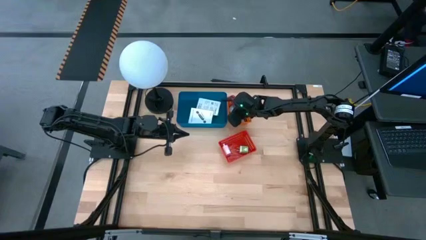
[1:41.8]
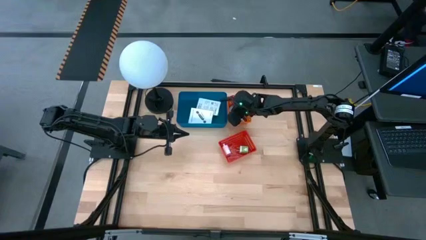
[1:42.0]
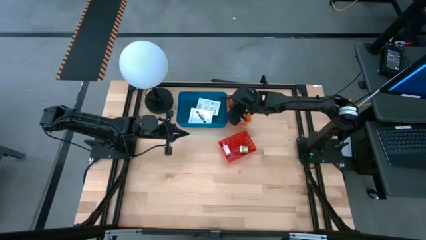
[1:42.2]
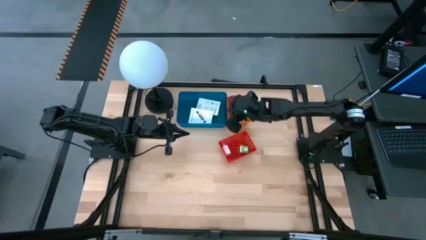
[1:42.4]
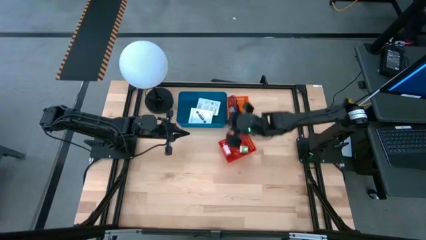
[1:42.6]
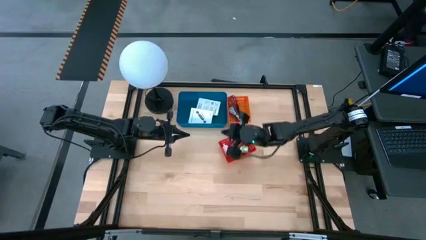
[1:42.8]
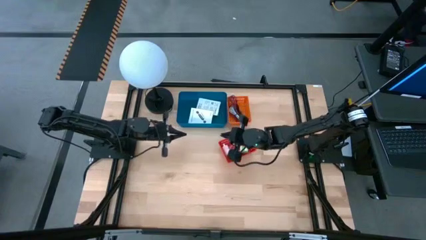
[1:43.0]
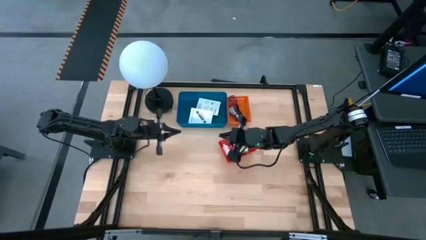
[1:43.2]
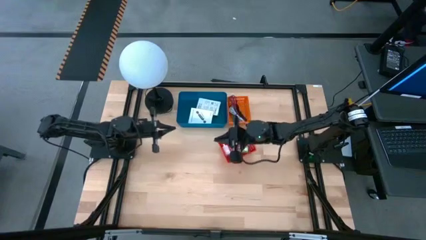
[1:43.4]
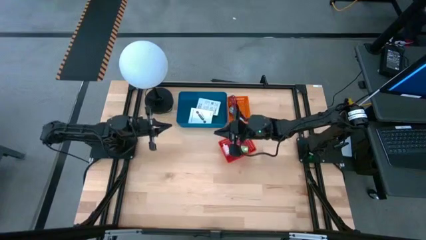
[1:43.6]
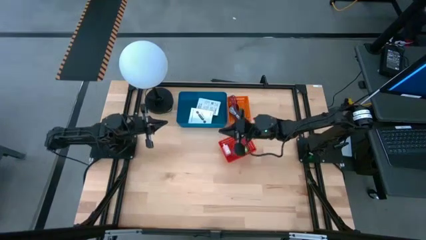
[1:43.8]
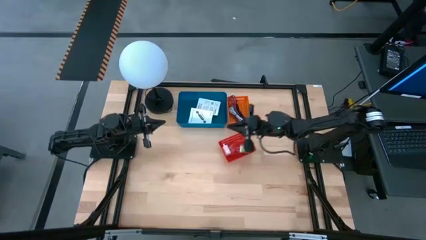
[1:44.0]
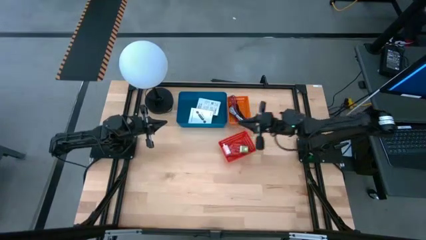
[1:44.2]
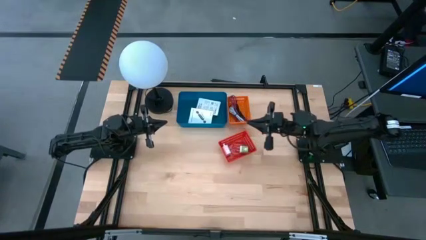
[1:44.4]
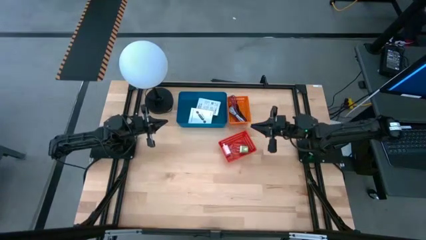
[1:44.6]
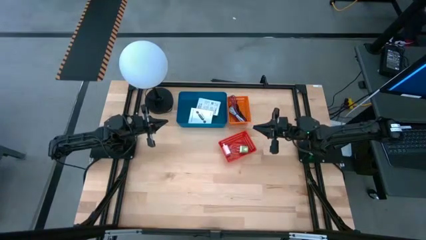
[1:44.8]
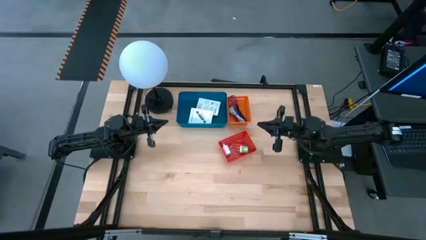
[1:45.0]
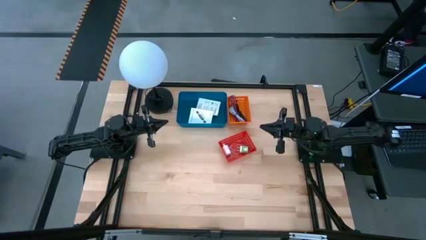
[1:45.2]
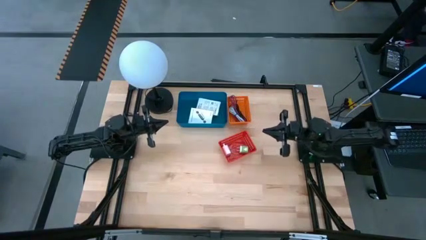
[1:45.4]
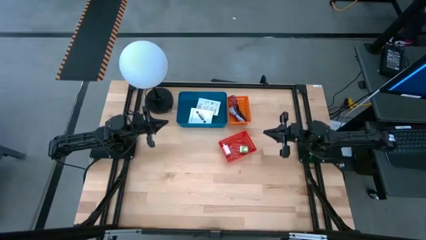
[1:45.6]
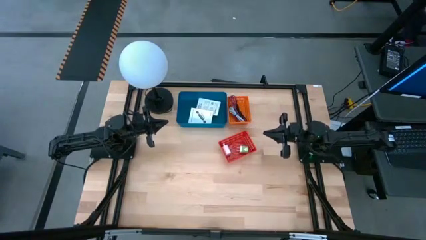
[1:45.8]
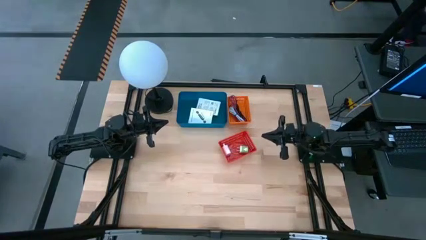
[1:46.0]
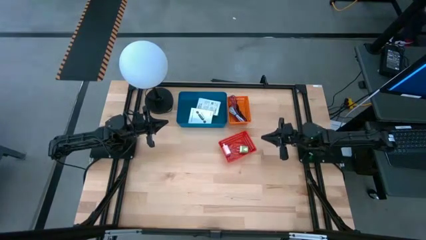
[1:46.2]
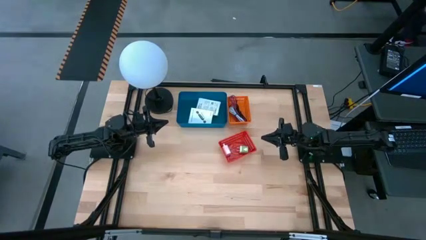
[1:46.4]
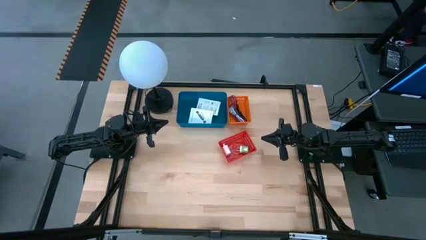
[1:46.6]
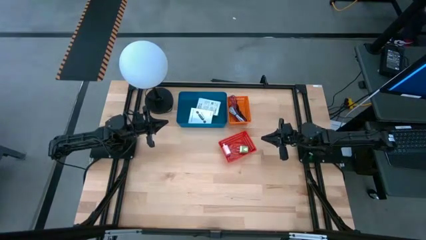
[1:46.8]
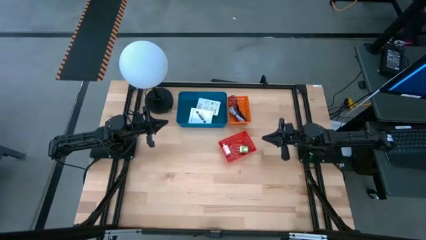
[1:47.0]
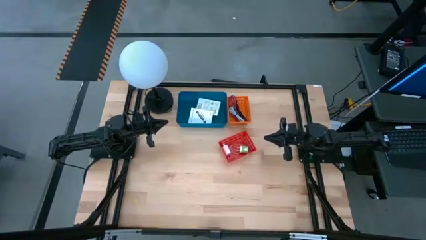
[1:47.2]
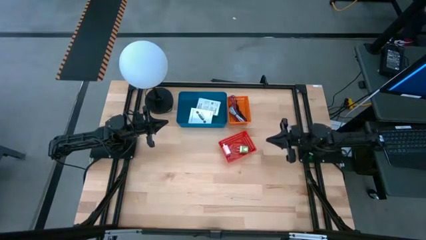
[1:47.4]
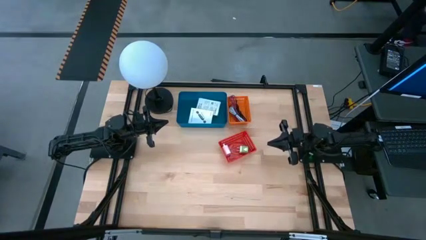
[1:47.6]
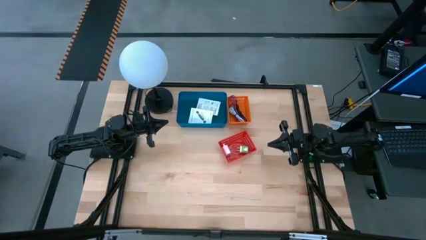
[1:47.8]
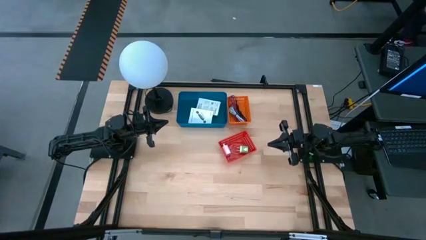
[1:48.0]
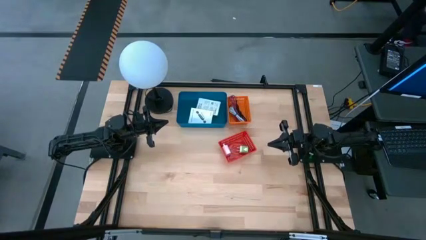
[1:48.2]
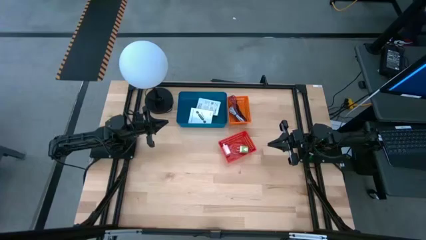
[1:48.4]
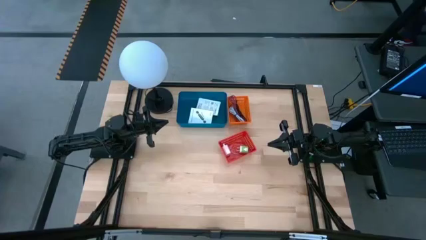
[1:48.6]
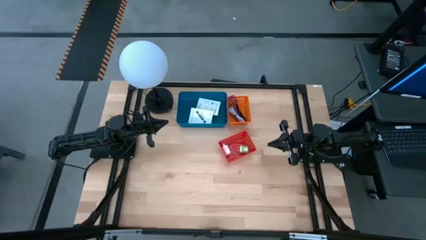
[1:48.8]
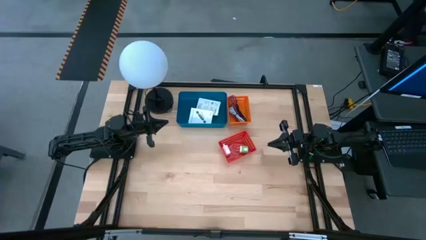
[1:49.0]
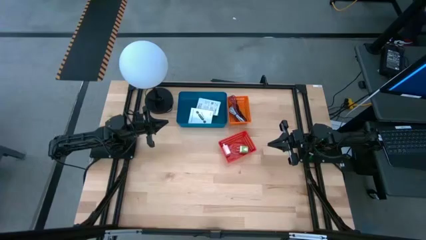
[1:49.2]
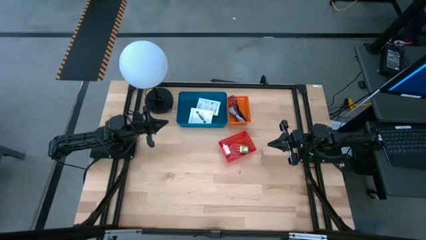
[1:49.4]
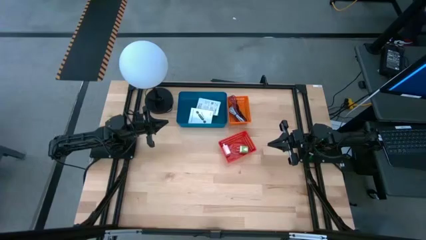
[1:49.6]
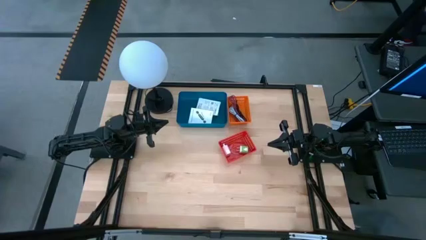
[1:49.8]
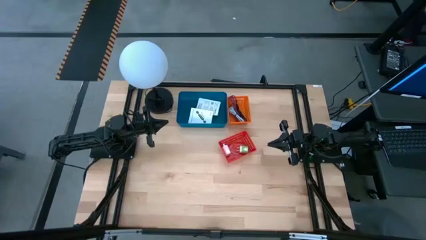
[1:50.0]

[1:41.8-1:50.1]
Task: Pick and place items into bin
Return to Home Position

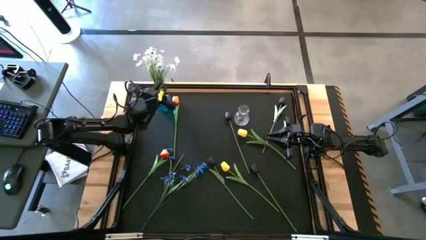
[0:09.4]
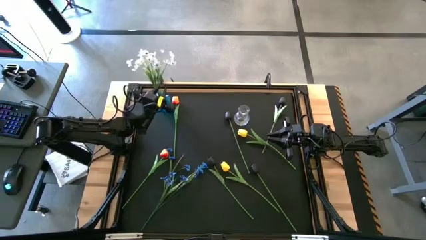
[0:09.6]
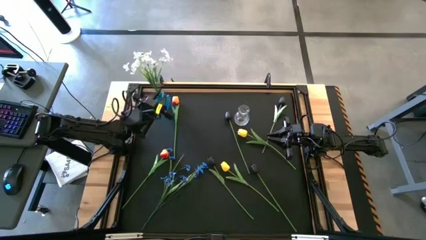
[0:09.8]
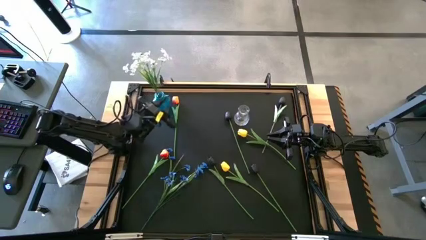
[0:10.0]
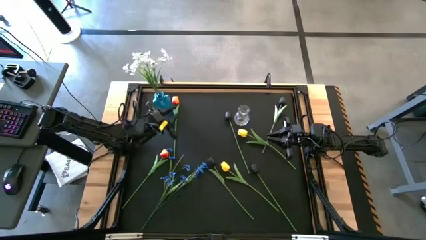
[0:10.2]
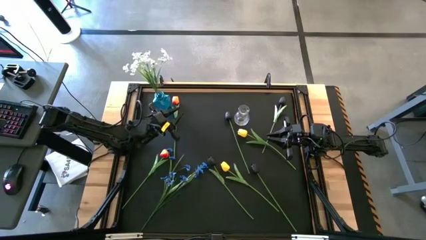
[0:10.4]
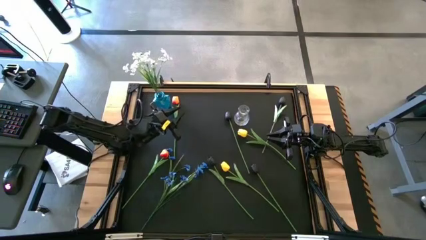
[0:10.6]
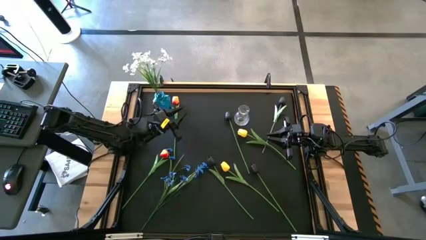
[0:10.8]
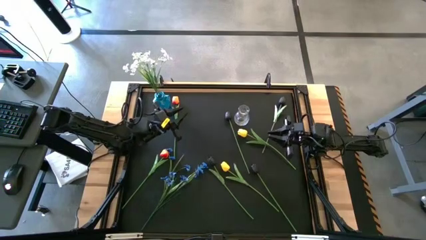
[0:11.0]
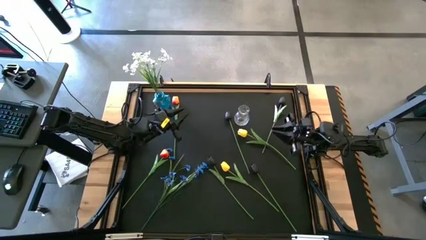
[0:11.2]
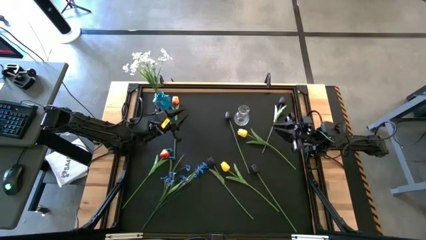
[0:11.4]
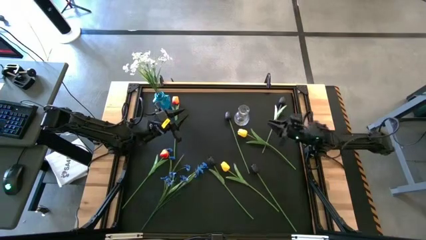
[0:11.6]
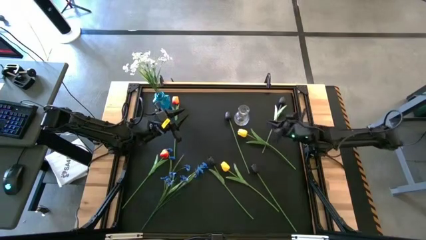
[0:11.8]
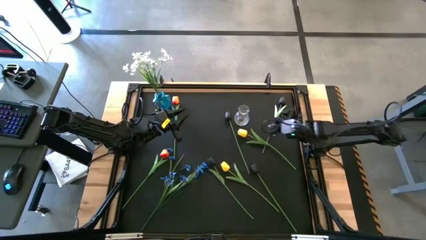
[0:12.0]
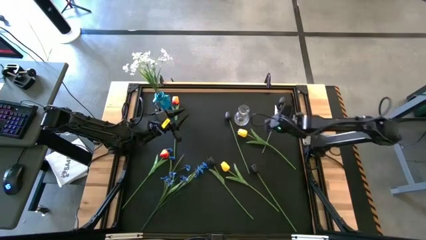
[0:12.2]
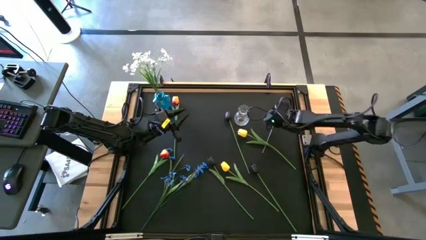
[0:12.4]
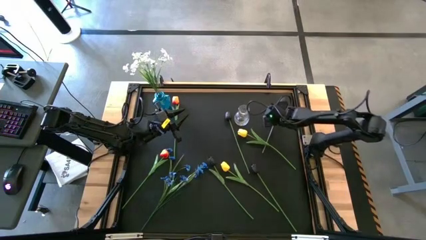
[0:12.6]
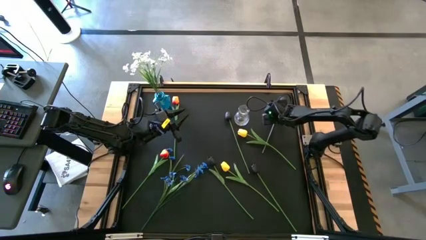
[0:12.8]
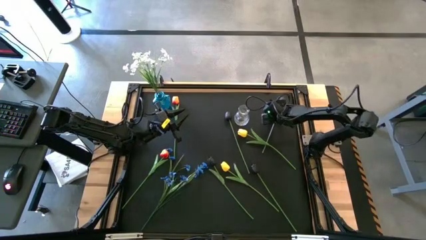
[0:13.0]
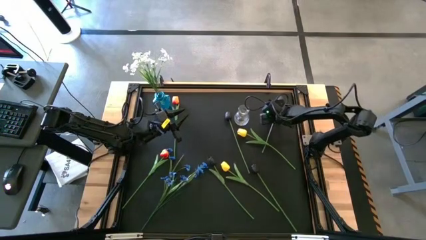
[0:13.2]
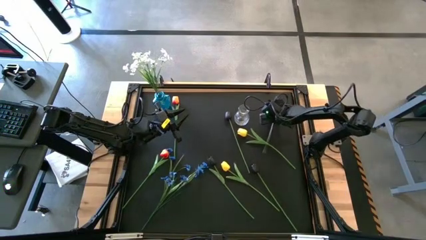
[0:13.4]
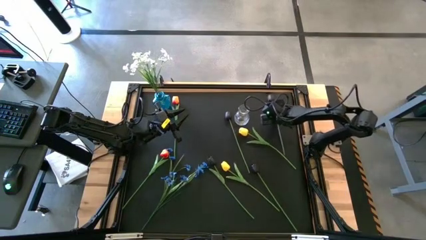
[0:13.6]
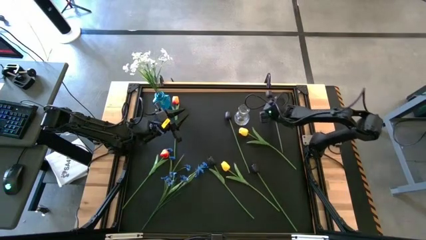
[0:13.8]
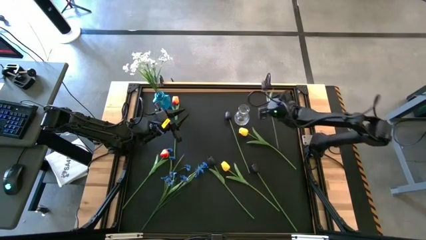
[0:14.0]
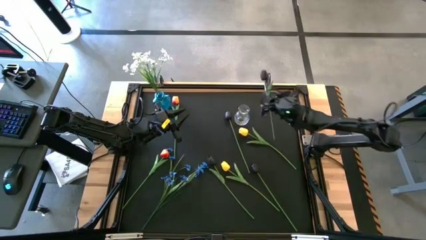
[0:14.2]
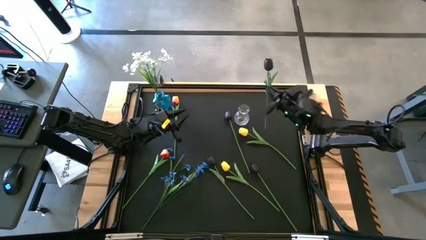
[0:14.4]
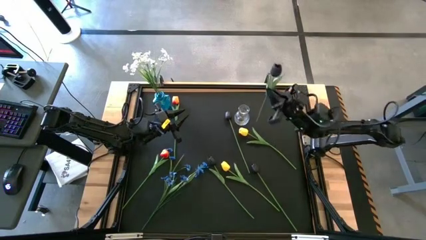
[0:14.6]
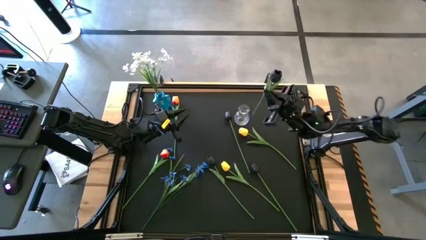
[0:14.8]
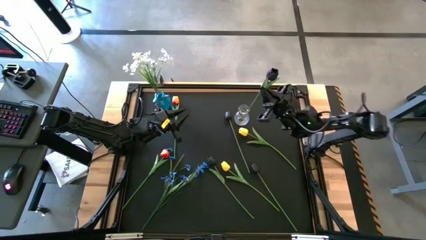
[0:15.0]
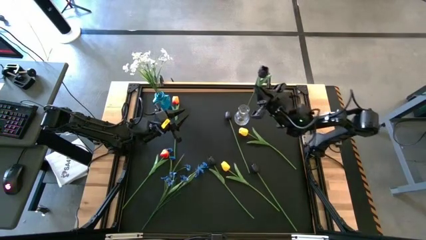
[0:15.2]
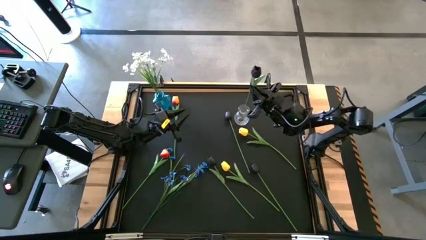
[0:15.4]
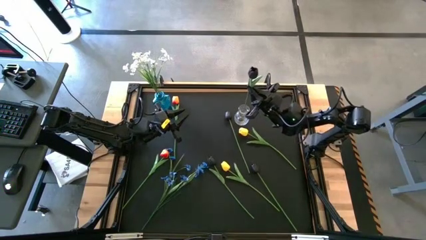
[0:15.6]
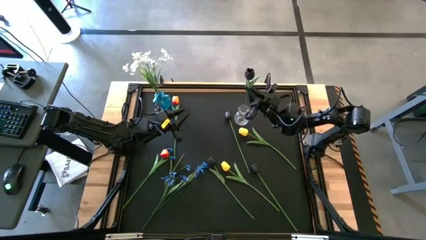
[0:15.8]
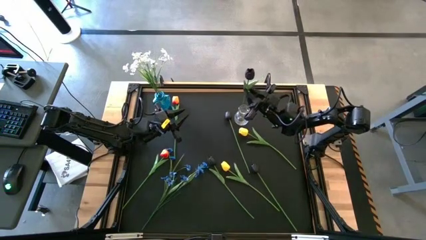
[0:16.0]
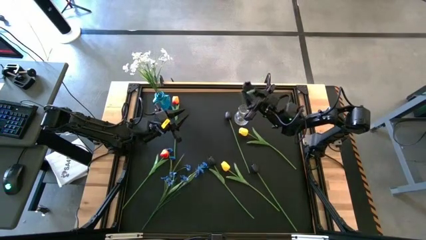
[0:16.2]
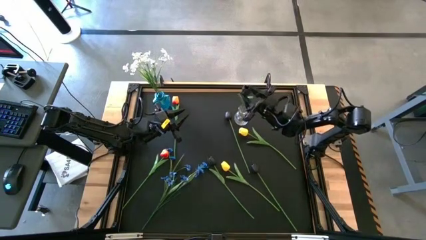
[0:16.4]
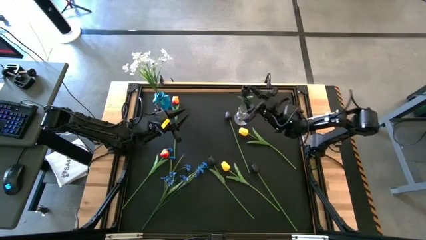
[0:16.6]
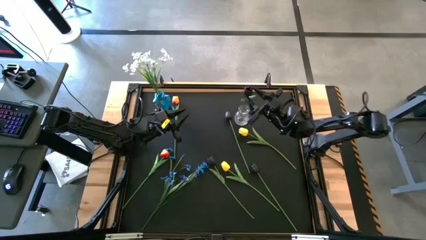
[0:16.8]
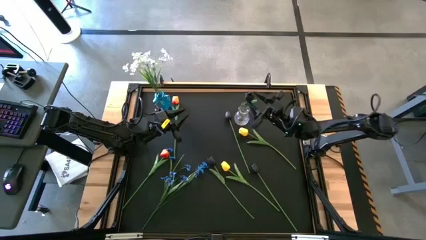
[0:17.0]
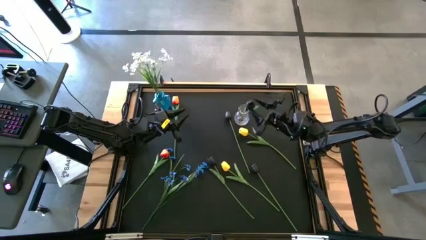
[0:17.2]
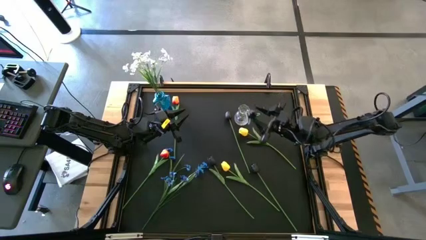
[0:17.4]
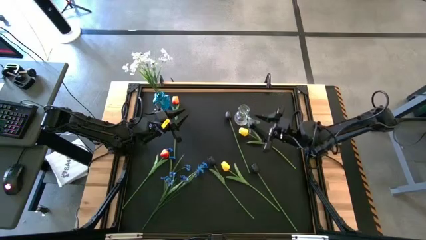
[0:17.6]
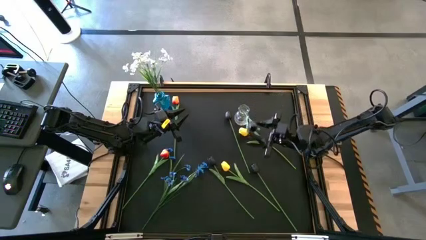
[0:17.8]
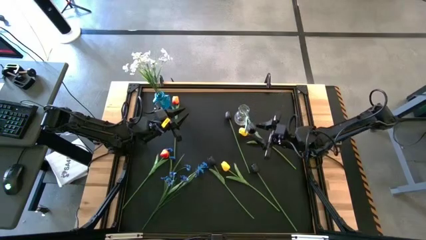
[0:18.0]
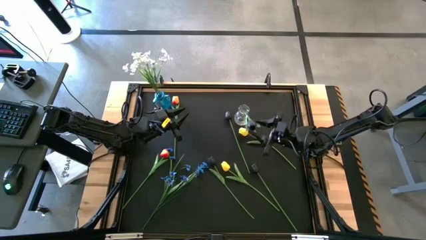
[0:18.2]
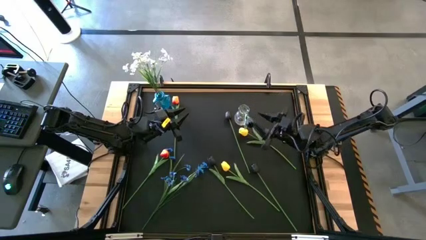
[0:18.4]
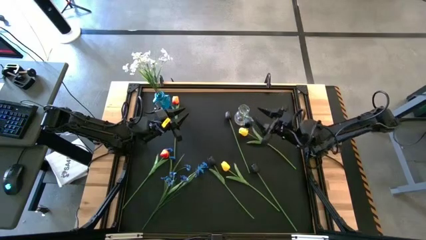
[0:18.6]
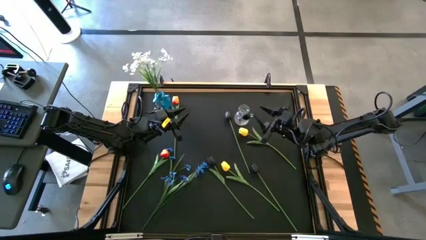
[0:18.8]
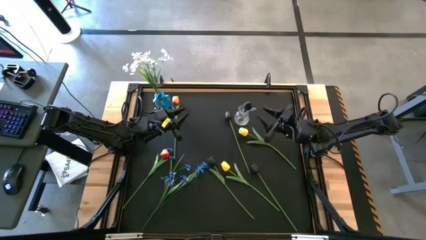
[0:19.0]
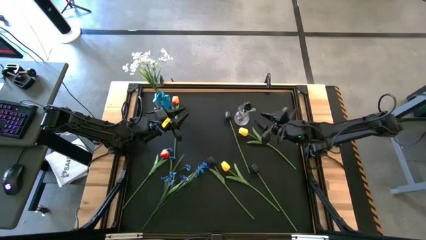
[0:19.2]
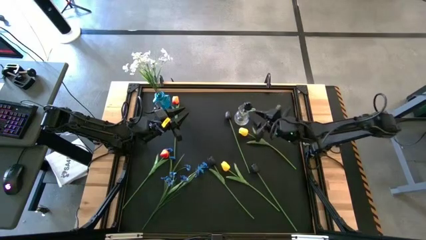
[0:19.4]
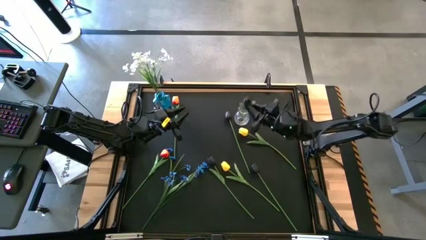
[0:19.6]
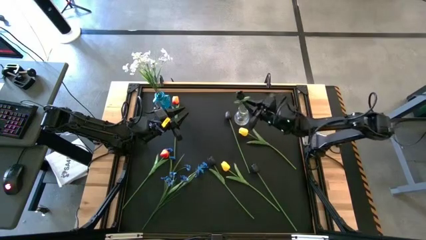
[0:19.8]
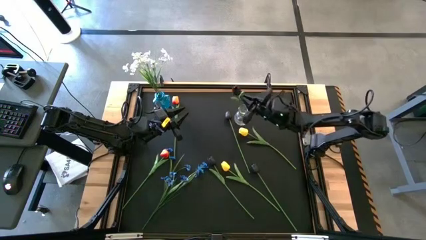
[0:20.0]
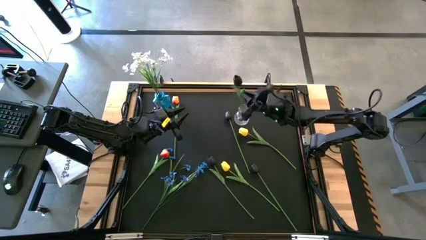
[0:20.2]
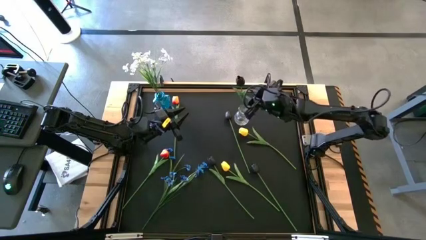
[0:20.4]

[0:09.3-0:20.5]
Task: Sort flowers into vase by color
Put the black flower into the transparent vase
